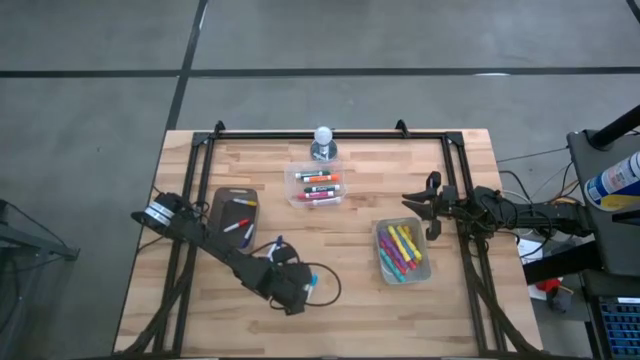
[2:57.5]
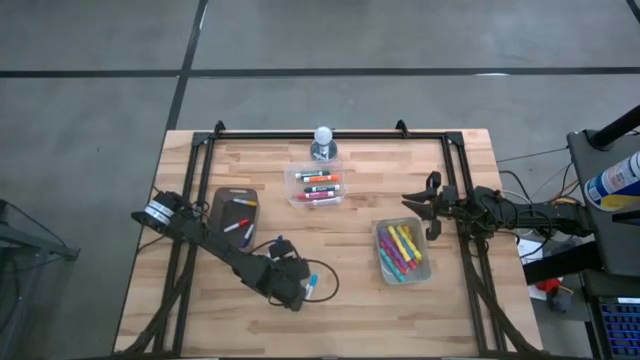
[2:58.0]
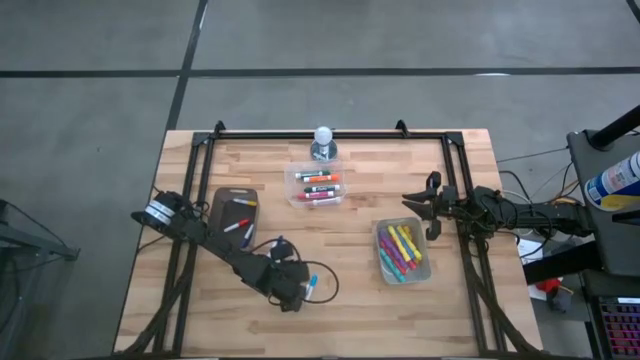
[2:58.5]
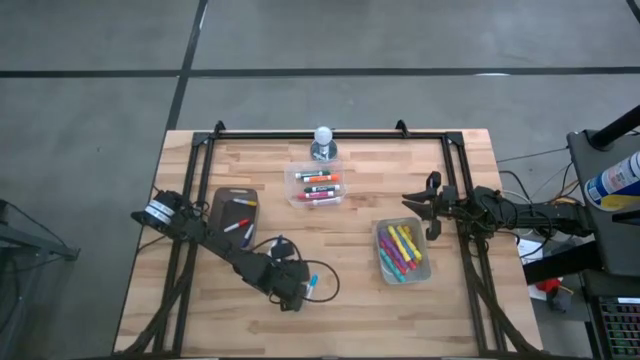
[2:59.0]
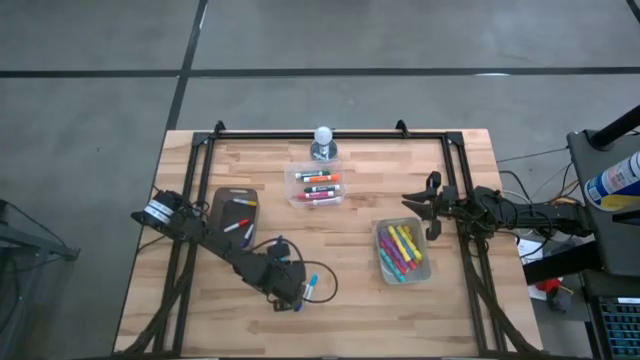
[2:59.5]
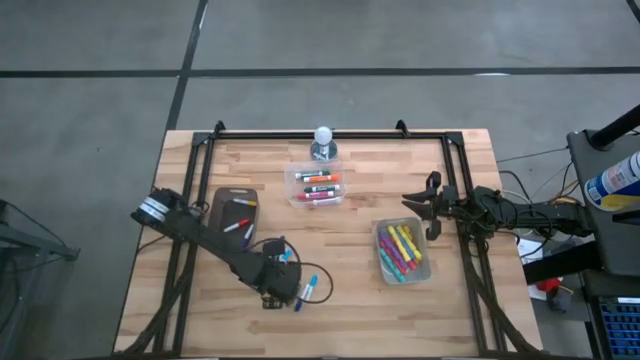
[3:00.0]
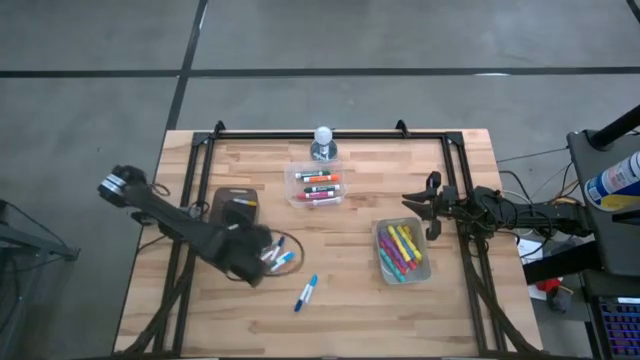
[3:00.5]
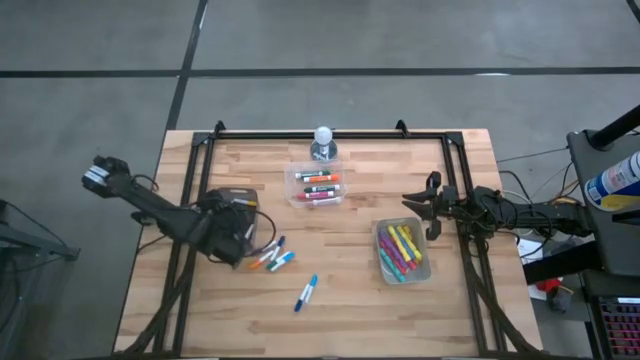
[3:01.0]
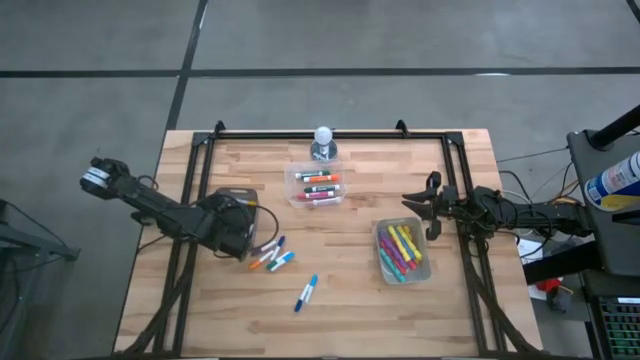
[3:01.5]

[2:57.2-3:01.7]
Task: Pick & Place Markers
Put the black mini marker into the transparent black bin

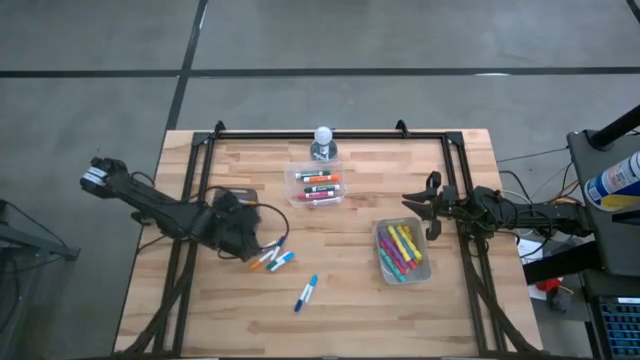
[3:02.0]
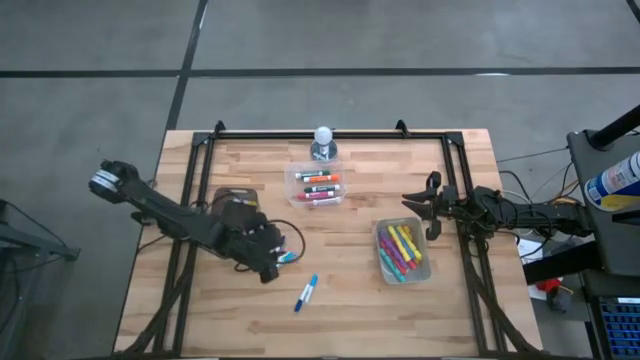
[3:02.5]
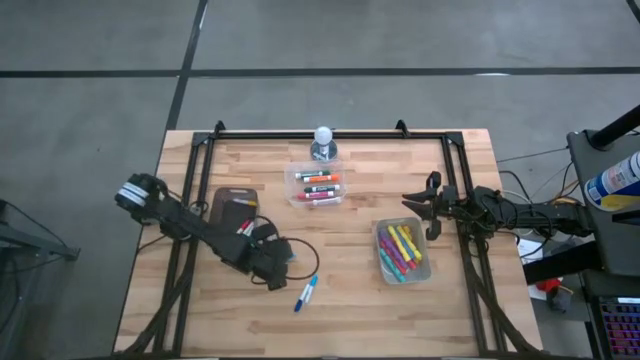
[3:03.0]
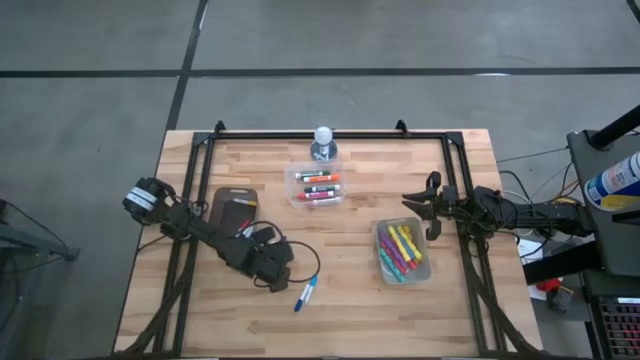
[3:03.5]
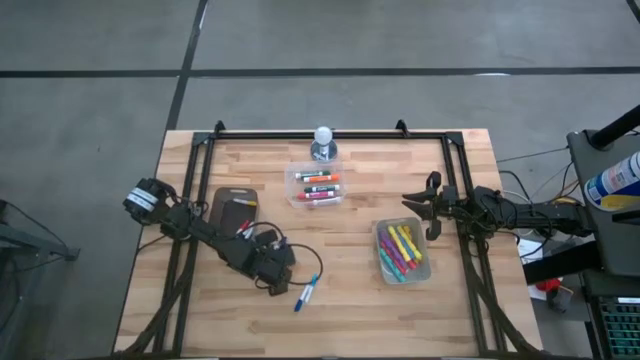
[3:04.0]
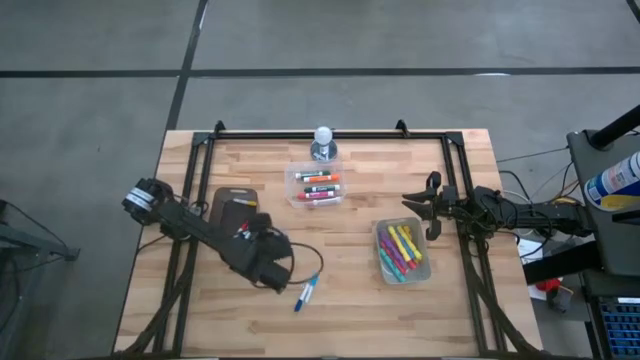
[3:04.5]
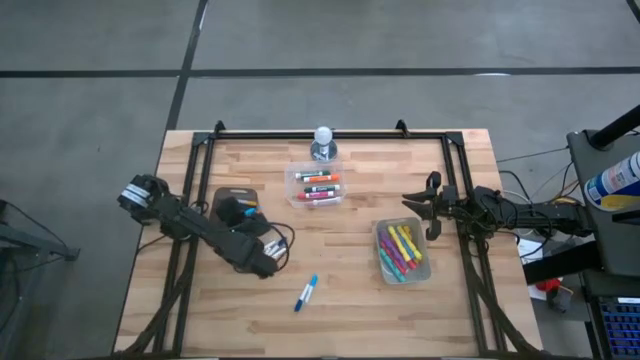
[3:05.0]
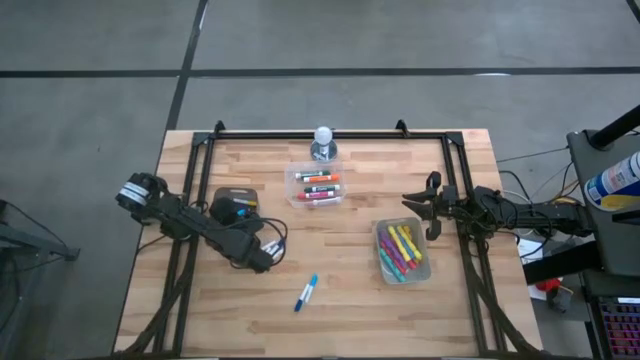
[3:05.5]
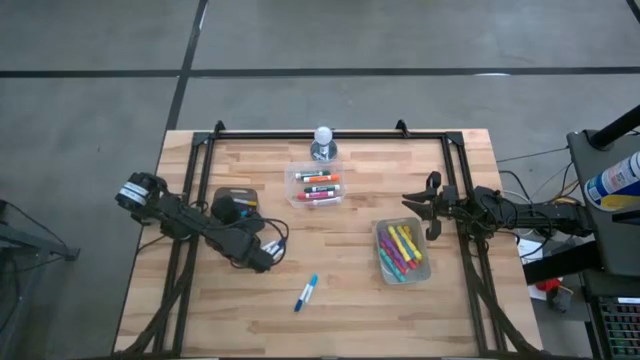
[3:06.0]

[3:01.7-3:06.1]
Put the left light blue mini marker into the transparent black bin

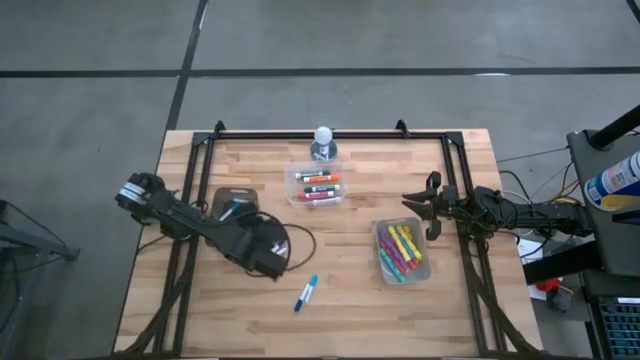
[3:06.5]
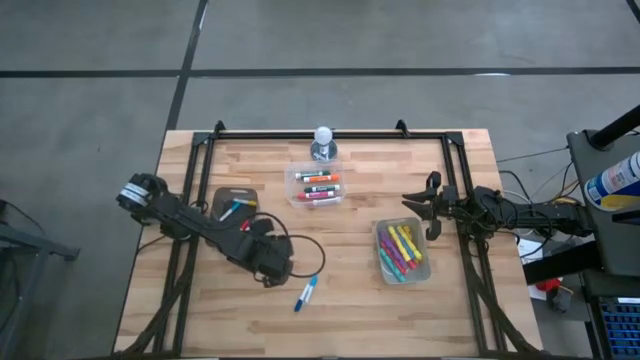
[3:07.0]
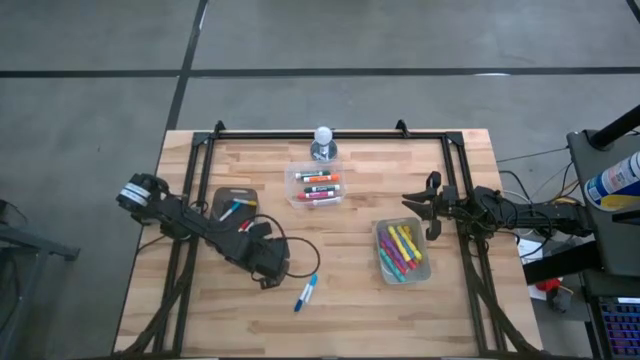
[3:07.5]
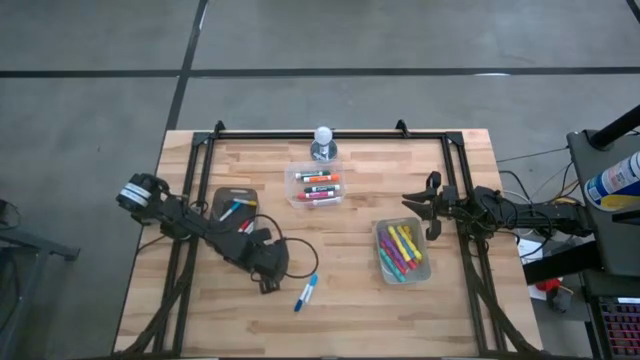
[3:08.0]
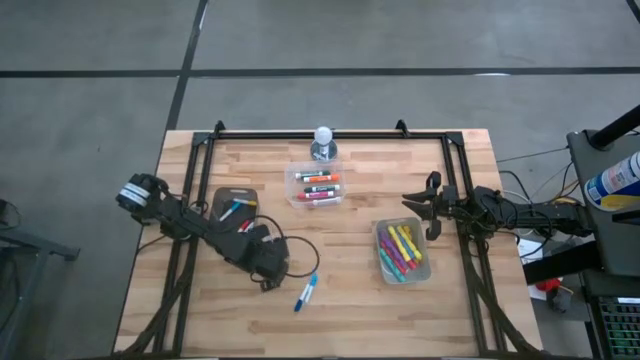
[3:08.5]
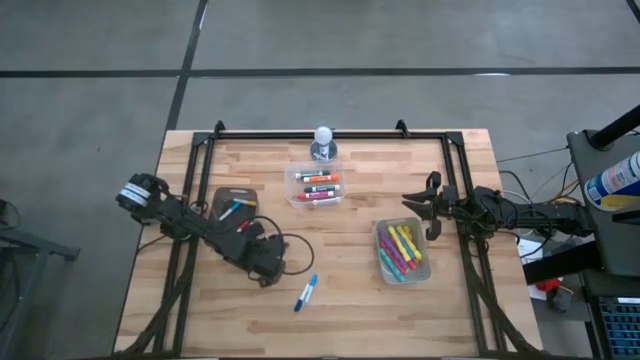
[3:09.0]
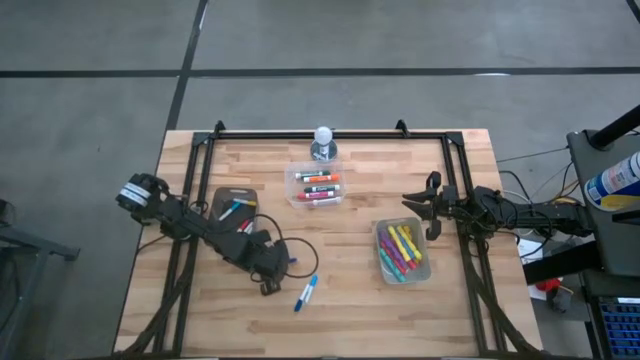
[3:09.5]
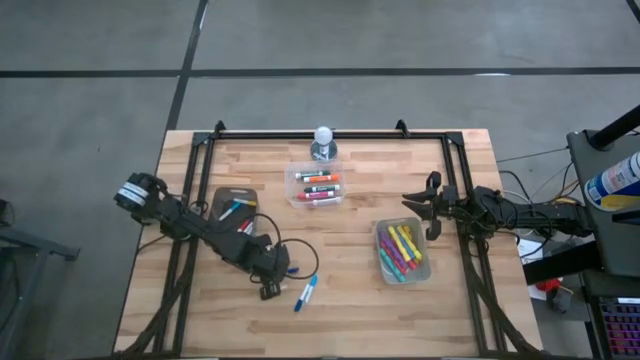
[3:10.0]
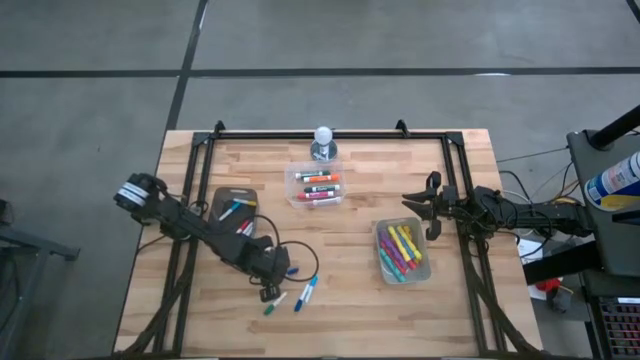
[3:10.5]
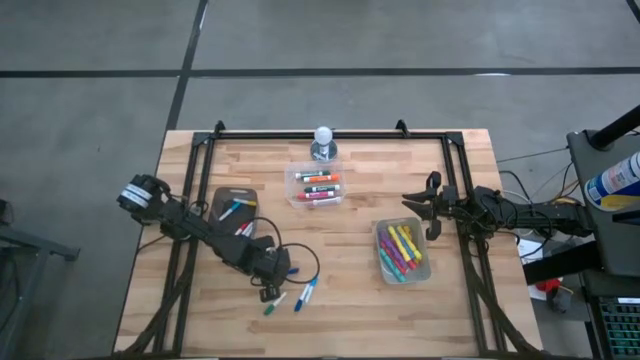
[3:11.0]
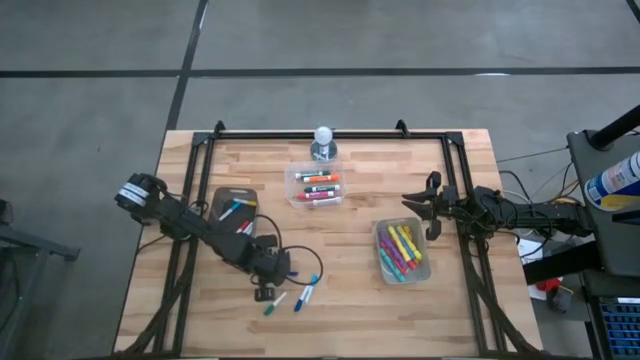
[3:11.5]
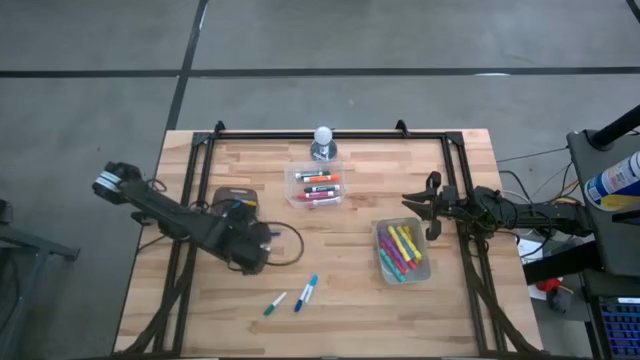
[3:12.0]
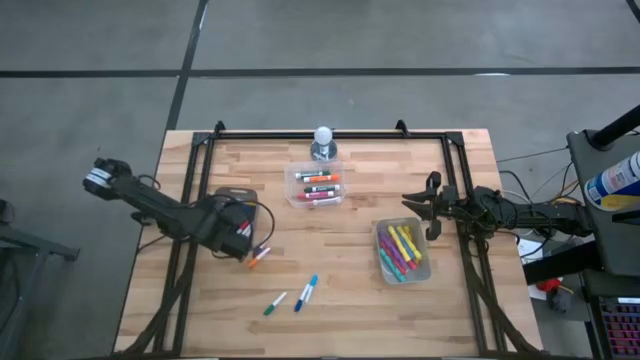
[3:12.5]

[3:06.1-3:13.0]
Put the top dark blue mini marker into the transparent black bin

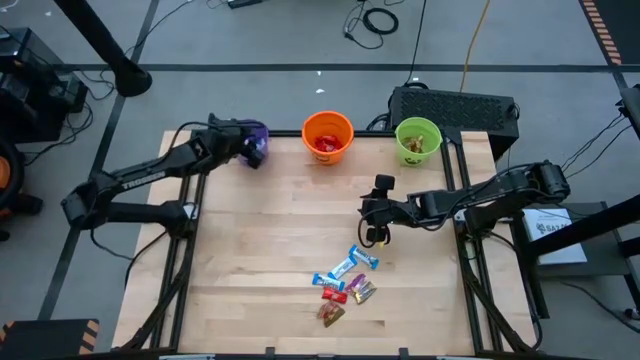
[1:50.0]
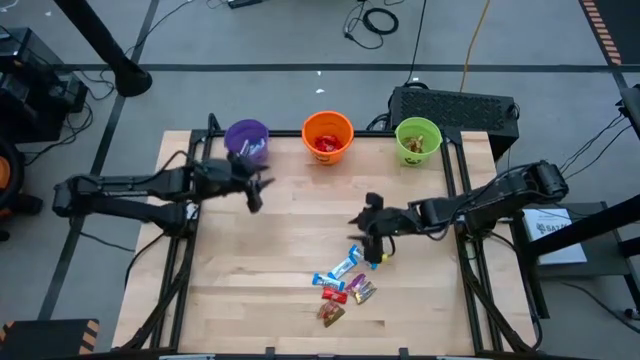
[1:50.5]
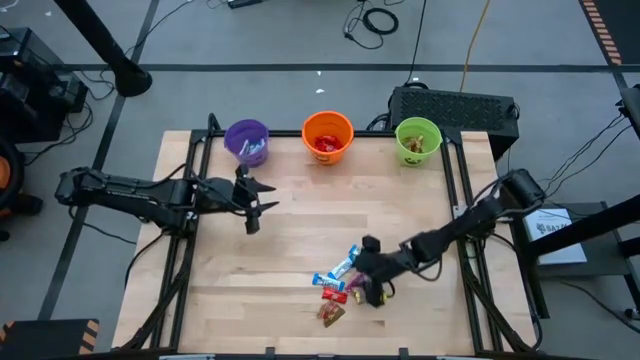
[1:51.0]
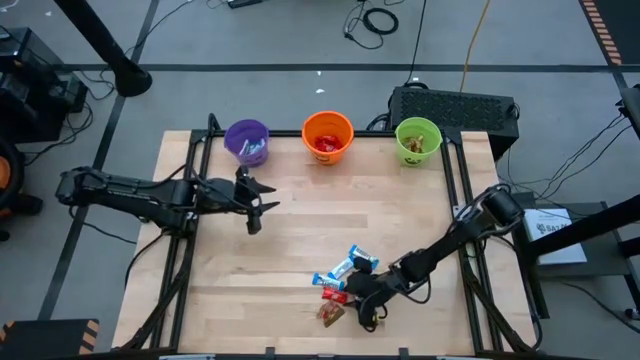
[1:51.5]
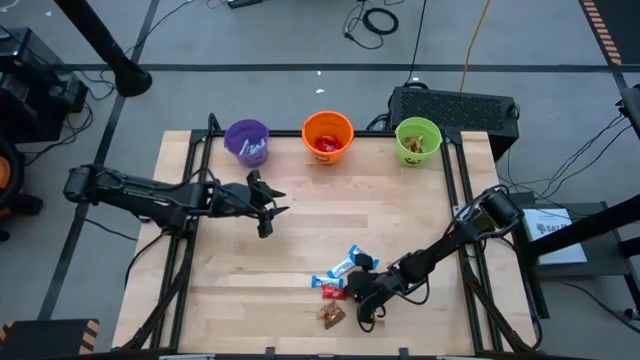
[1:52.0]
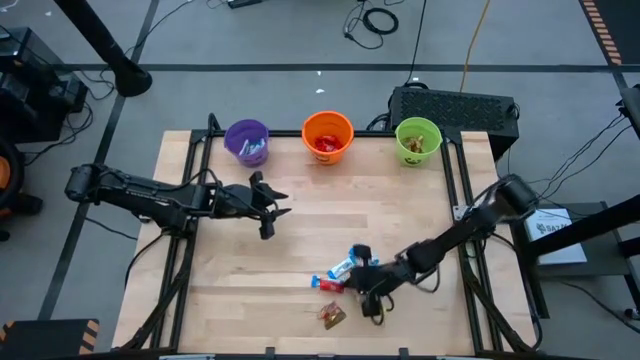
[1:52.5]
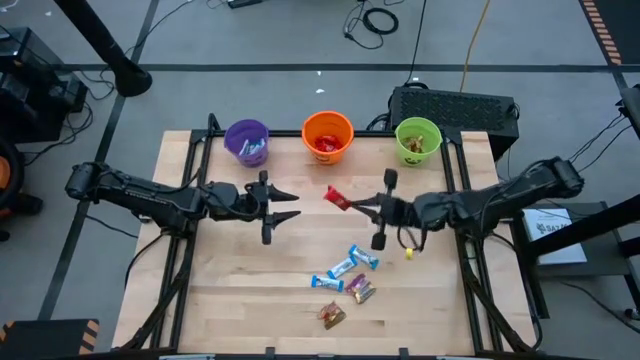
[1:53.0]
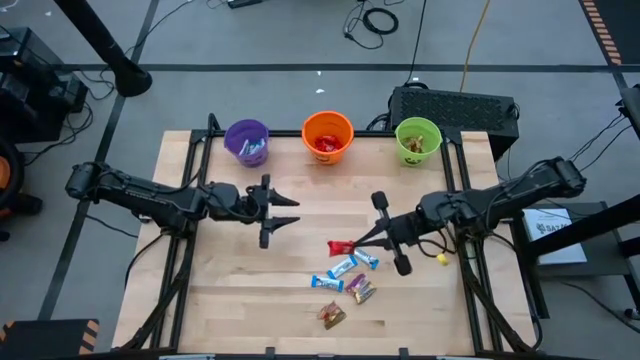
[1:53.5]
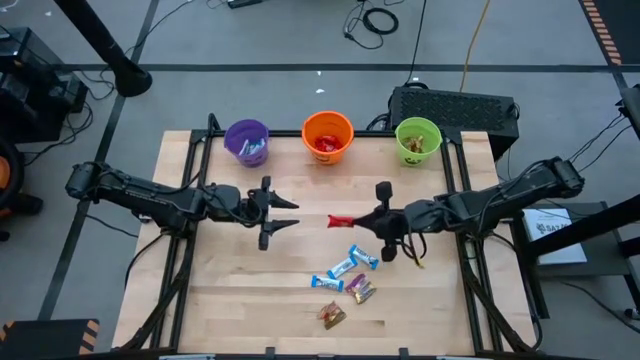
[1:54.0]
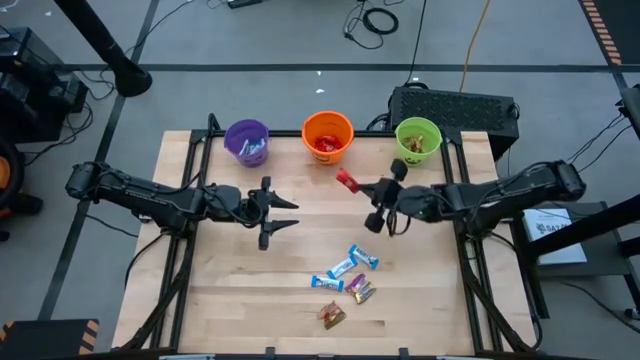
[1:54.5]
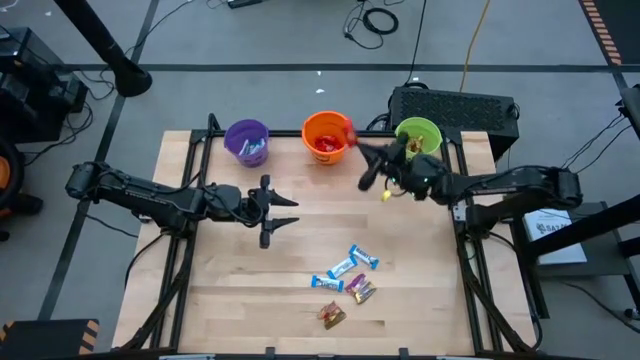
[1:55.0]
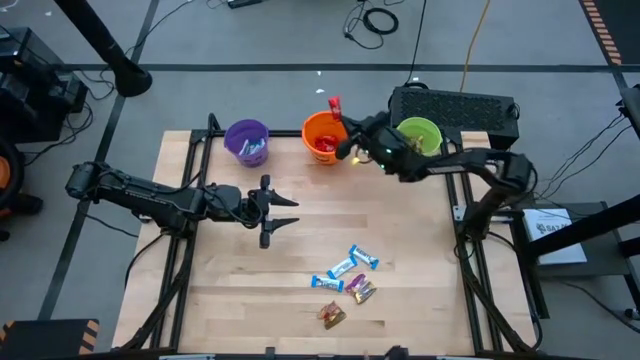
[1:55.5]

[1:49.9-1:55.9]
Task: Sort candy by brand, put in halloween buckets
Put the red chocolate into the orange bucket
